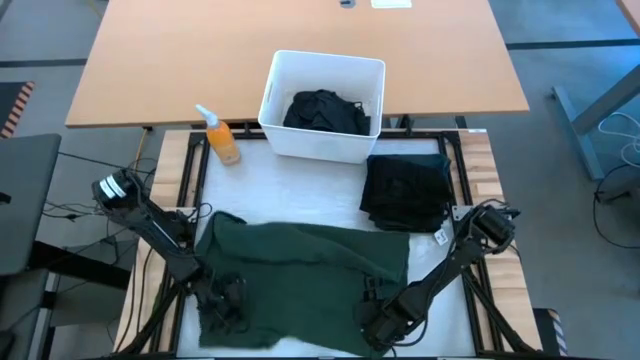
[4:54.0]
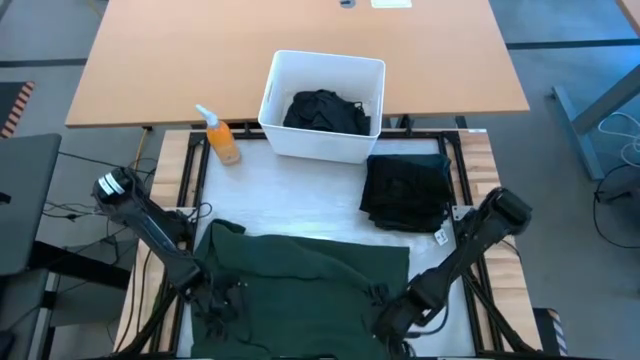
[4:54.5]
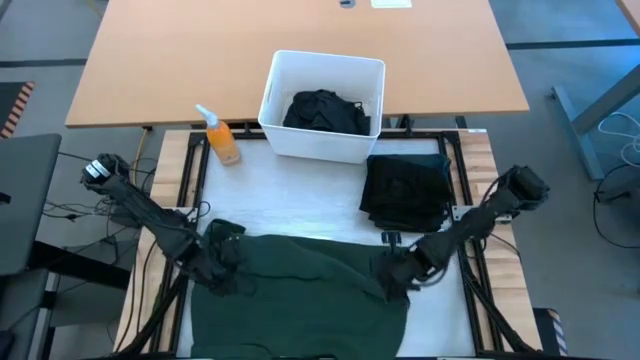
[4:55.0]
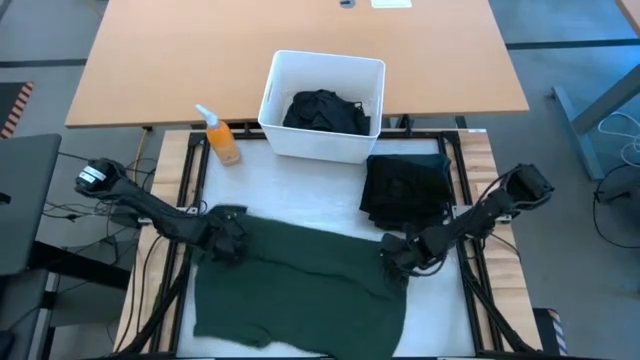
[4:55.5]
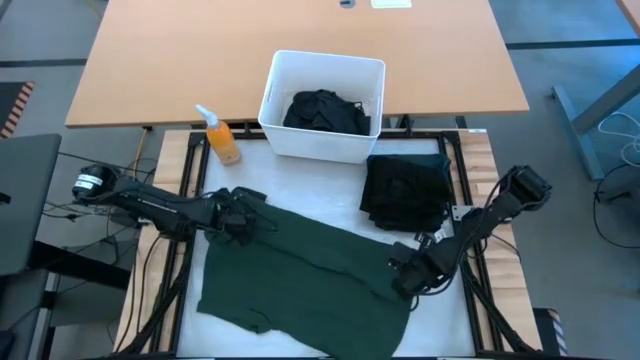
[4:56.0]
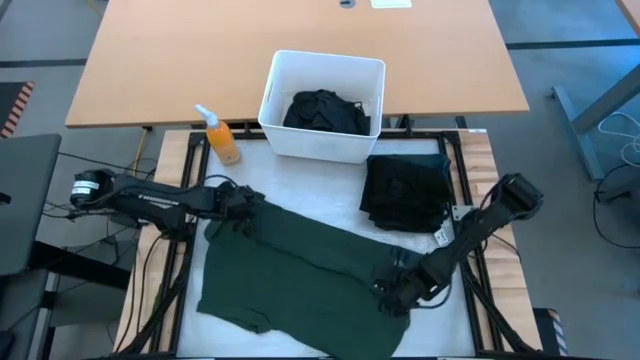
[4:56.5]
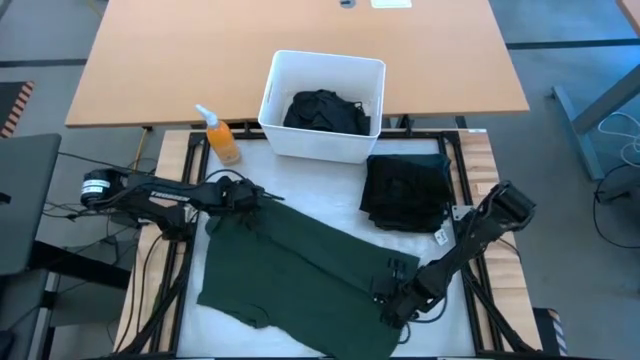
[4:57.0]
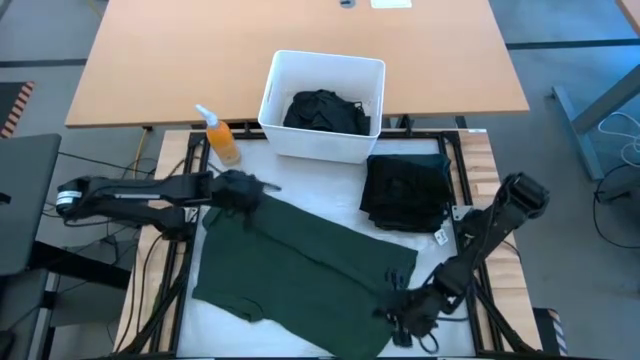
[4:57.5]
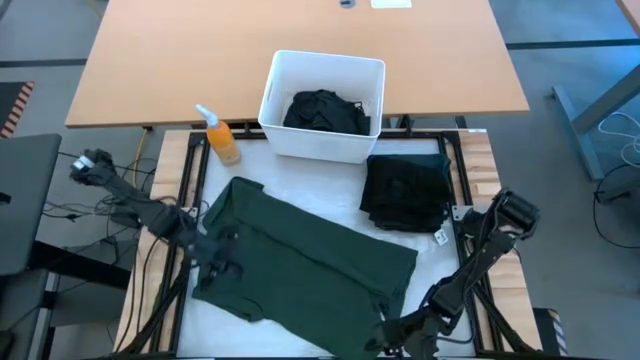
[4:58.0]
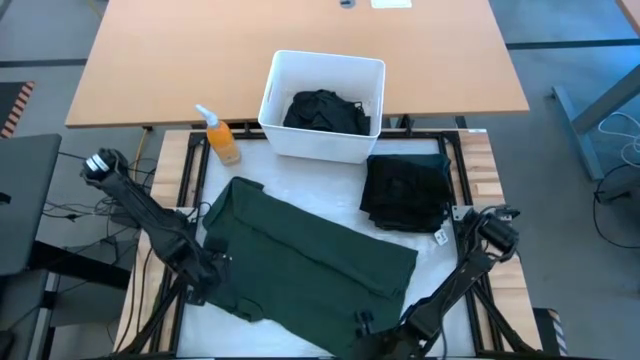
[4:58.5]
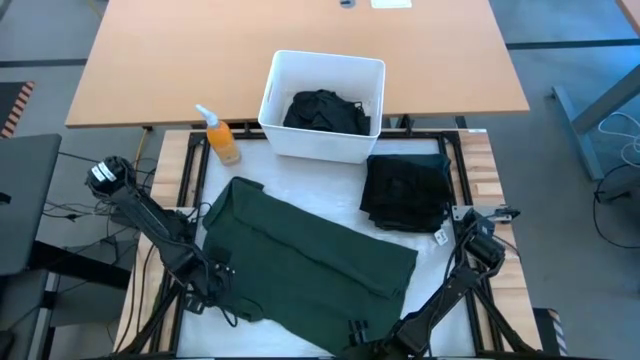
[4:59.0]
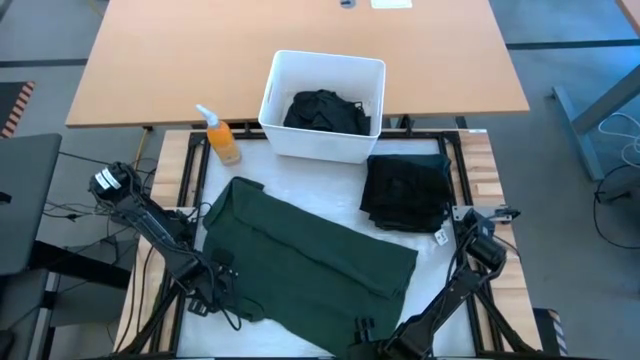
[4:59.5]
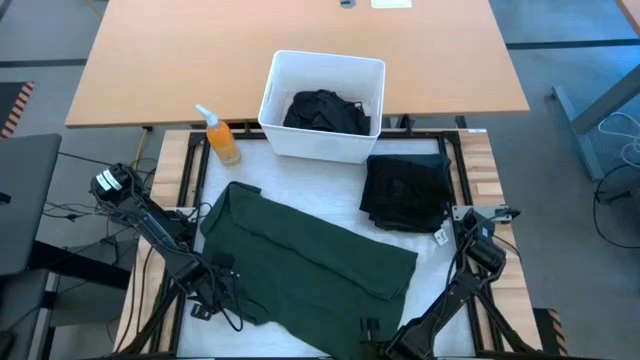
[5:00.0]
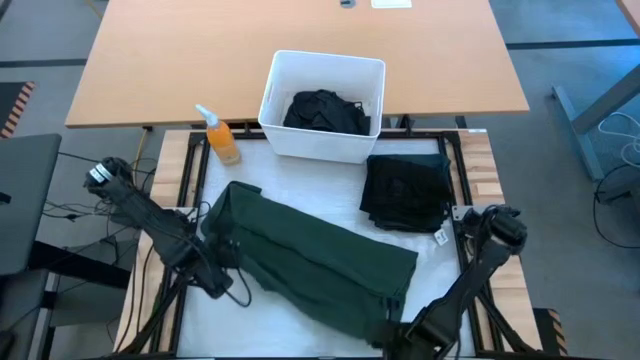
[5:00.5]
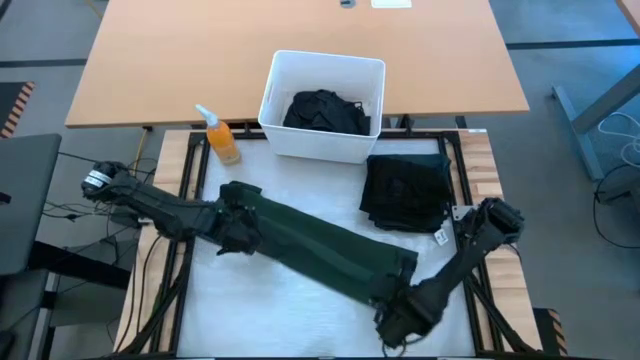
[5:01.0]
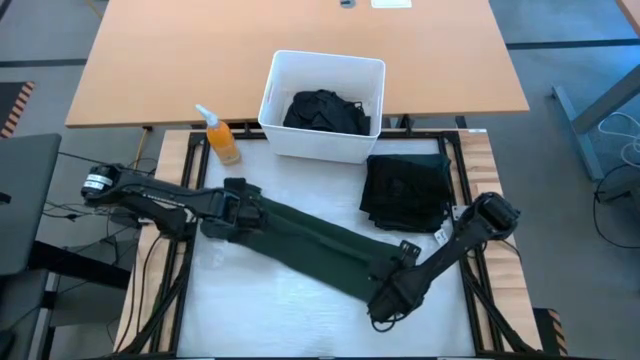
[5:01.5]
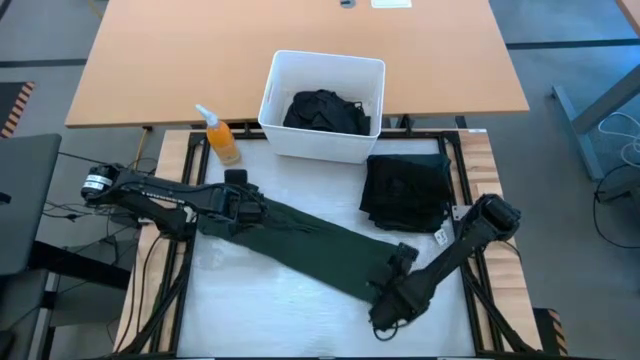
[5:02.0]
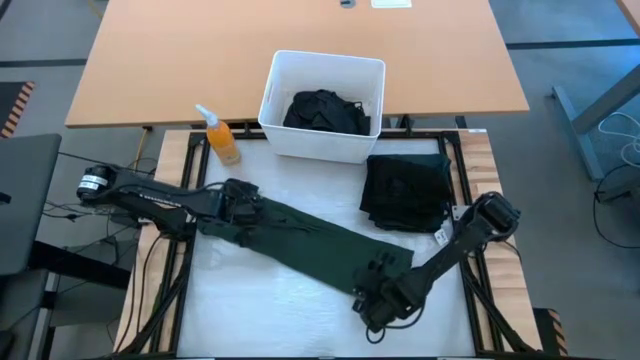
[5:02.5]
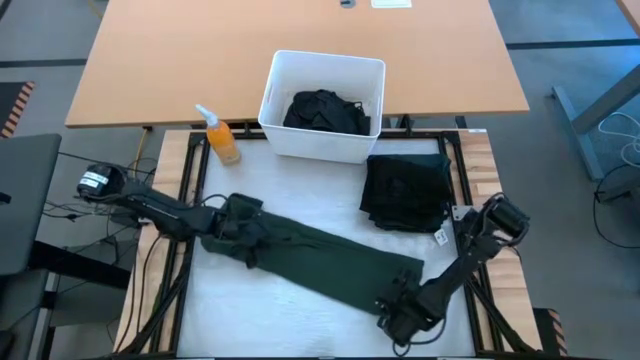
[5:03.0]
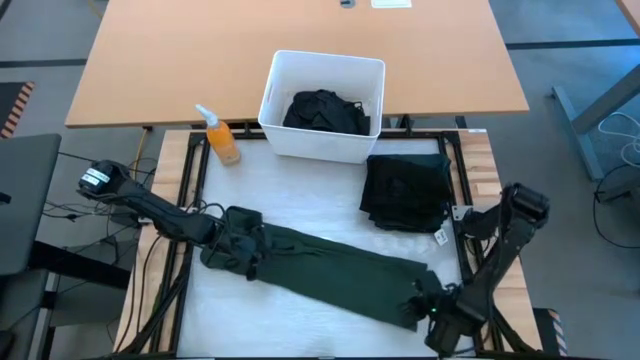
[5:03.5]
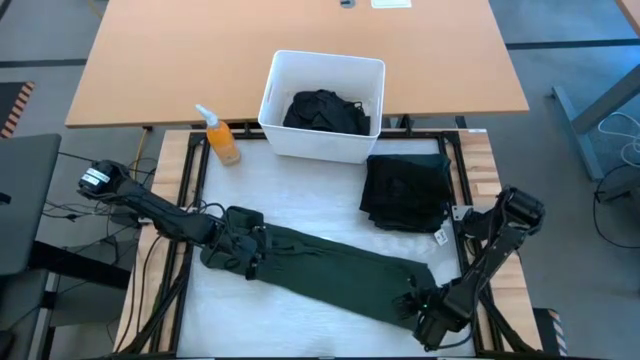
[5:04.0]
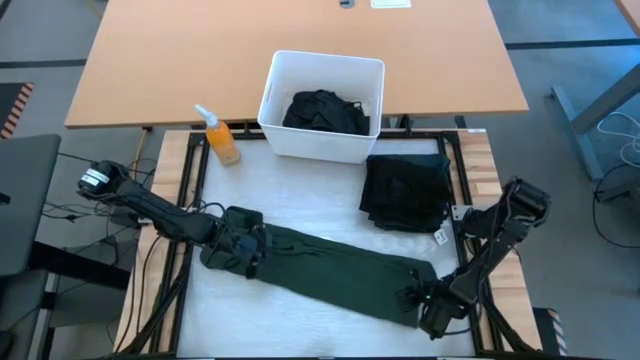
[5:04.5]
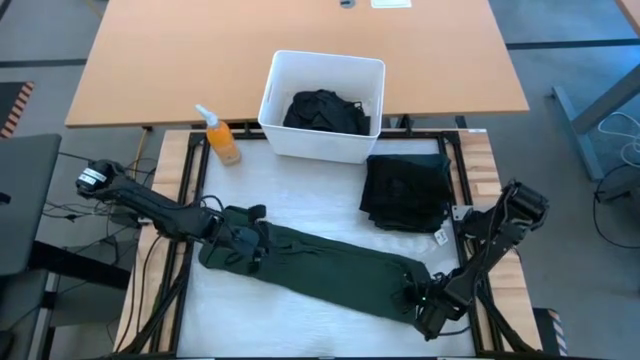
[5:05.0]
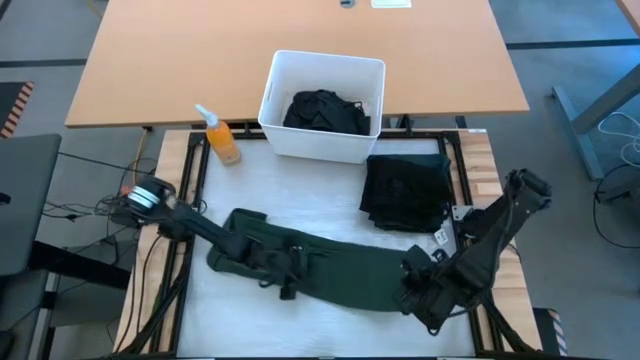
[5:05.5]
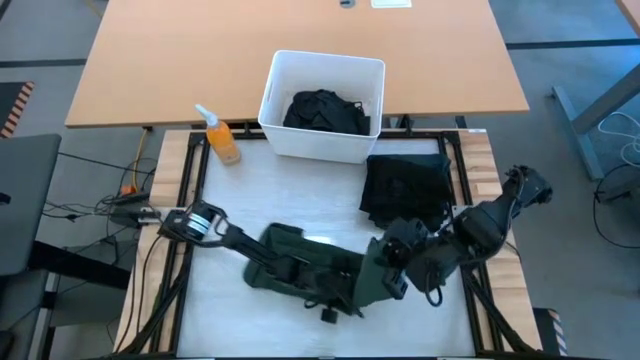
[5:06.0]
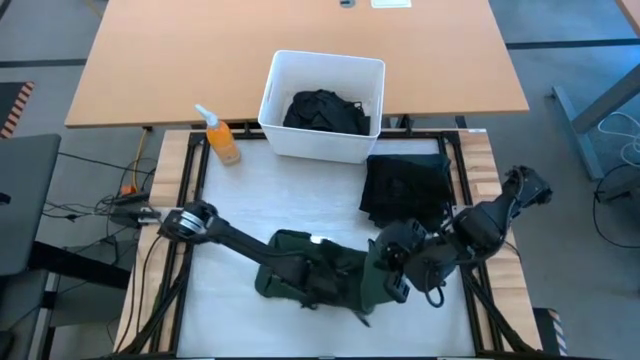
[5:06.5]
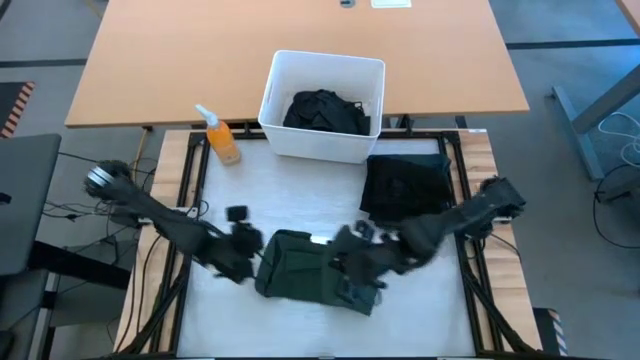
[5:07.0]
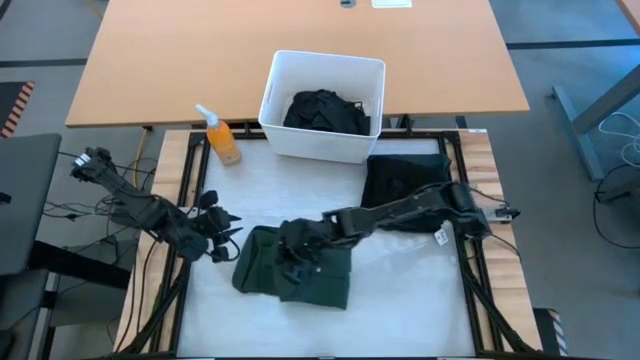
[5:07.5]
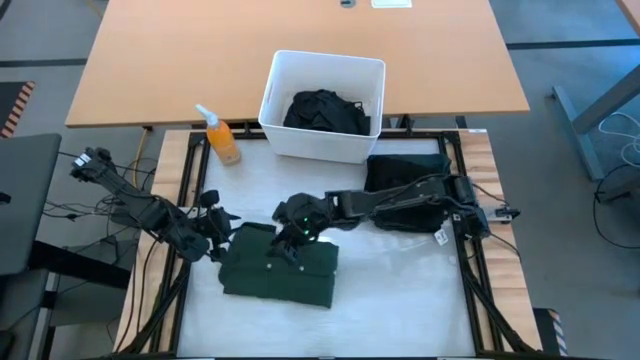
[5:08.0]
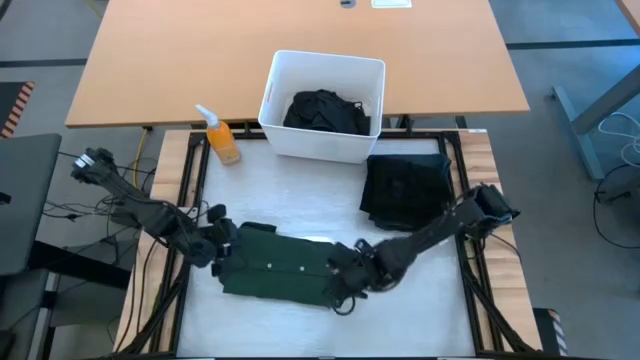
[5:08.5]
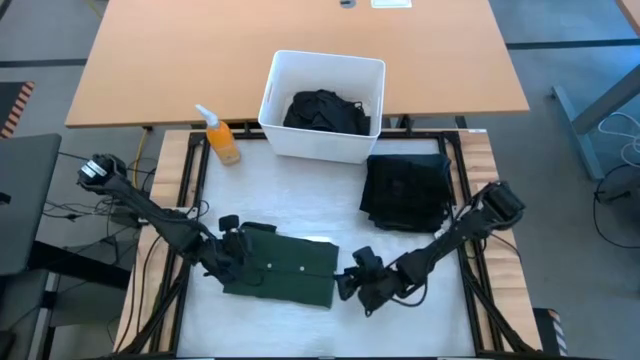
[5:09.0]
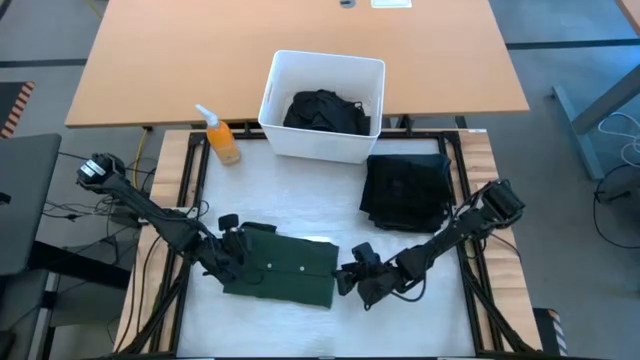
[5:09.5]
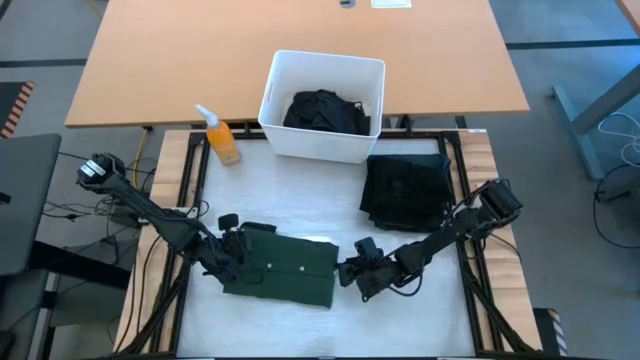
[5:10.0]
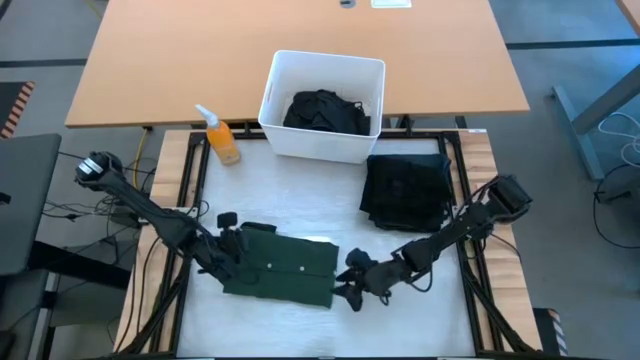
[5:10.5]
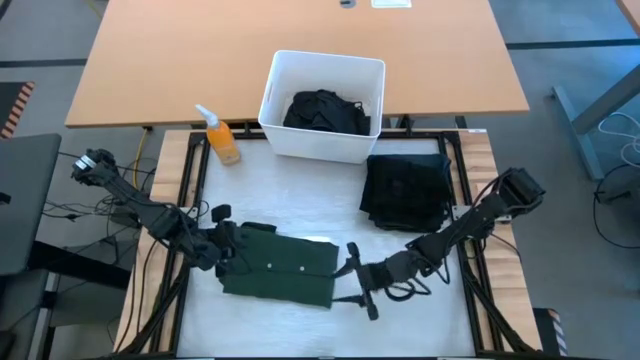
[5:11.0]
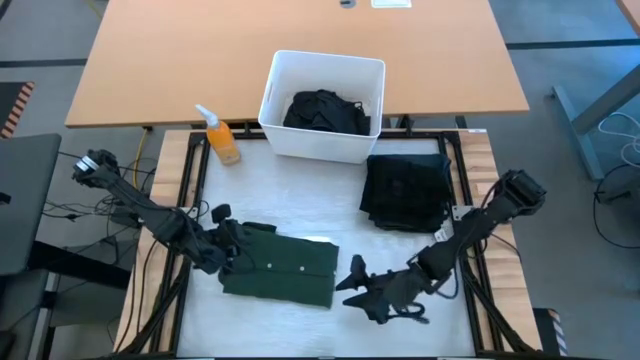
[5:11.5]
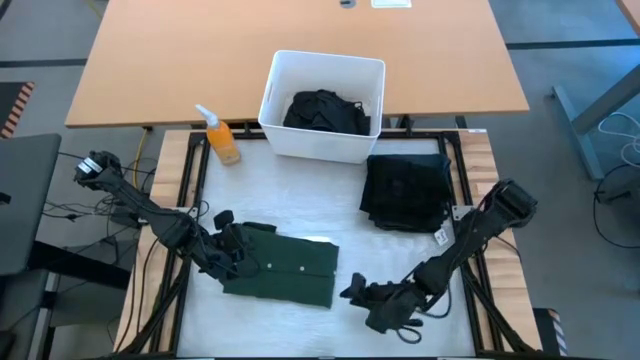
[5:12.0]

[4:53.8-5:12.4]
Task: Fold laundry
Fold the green polo shirt
